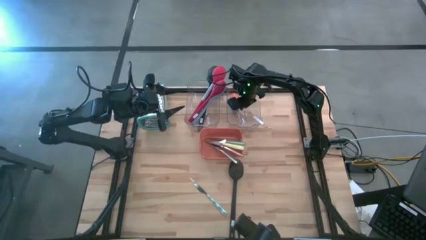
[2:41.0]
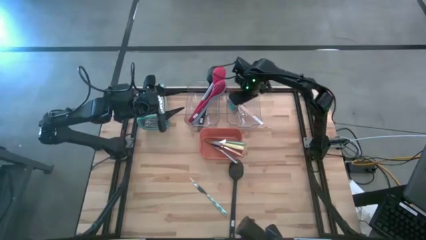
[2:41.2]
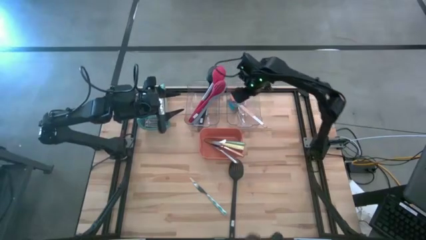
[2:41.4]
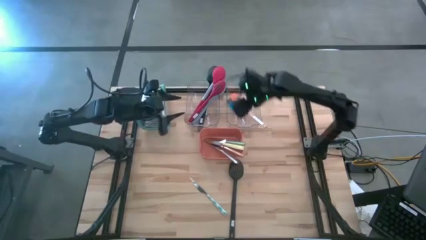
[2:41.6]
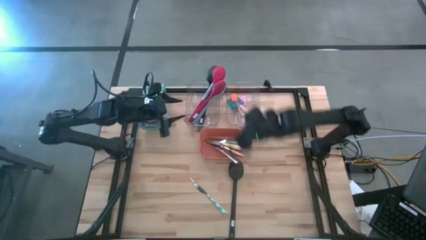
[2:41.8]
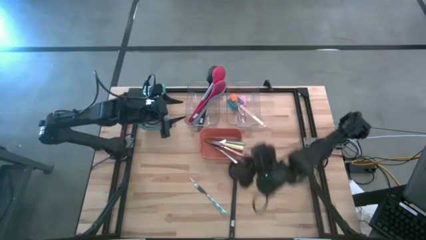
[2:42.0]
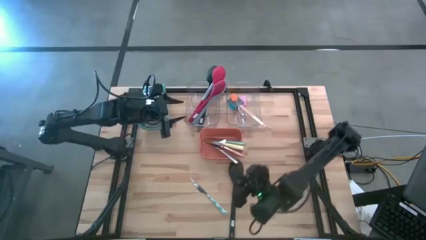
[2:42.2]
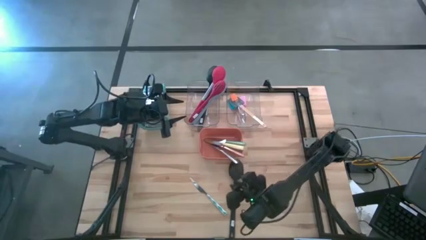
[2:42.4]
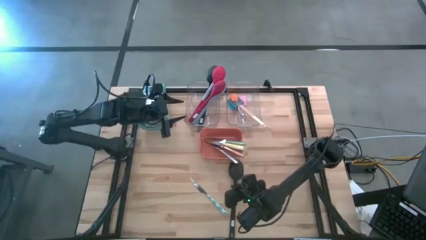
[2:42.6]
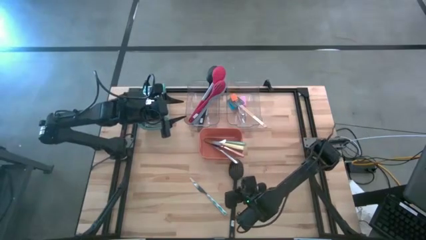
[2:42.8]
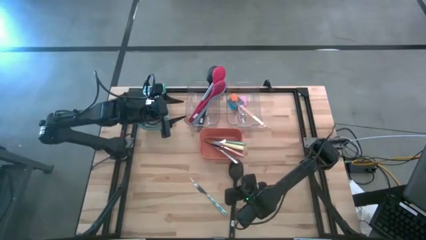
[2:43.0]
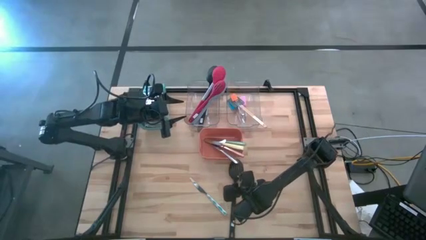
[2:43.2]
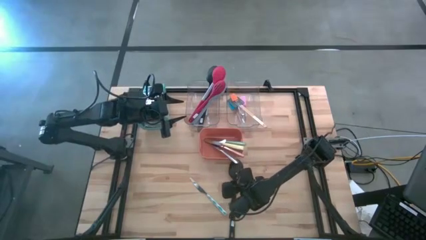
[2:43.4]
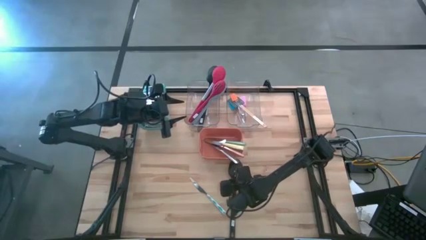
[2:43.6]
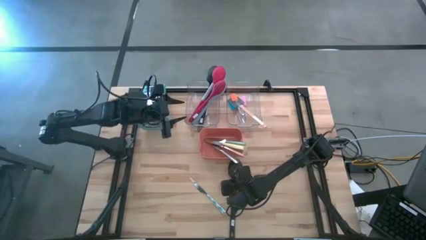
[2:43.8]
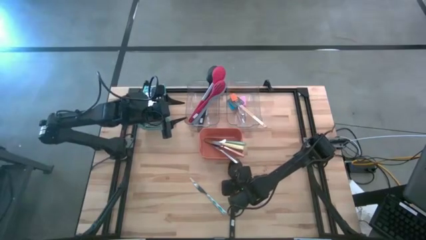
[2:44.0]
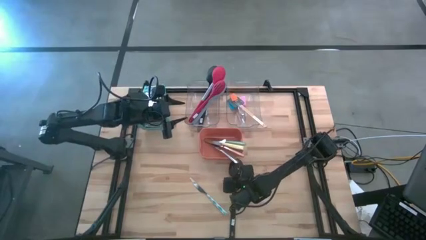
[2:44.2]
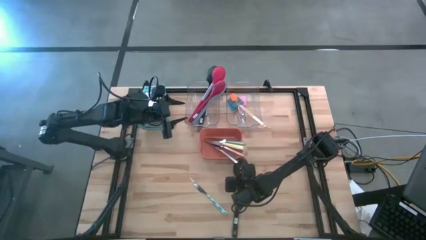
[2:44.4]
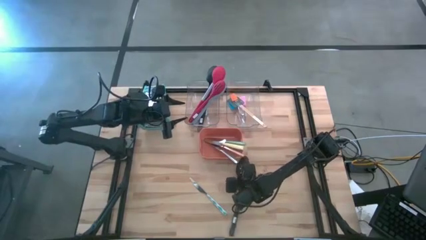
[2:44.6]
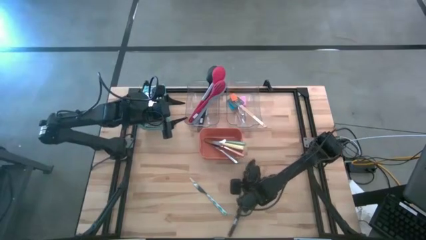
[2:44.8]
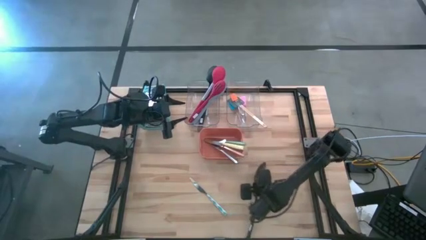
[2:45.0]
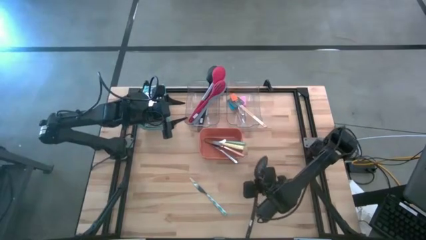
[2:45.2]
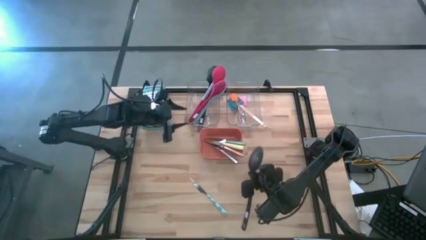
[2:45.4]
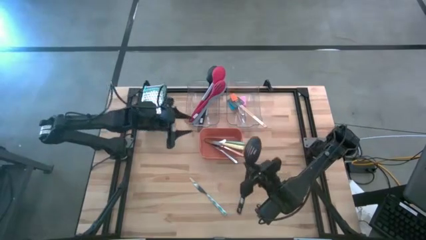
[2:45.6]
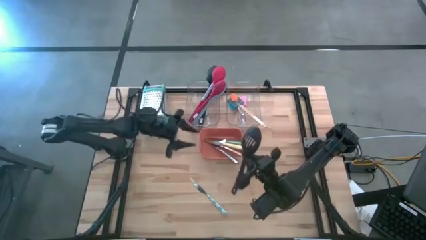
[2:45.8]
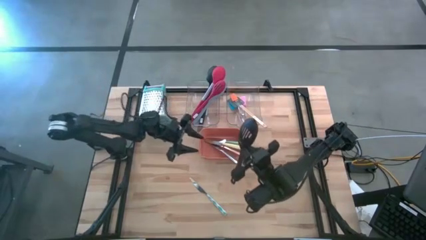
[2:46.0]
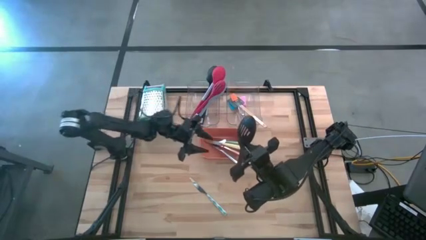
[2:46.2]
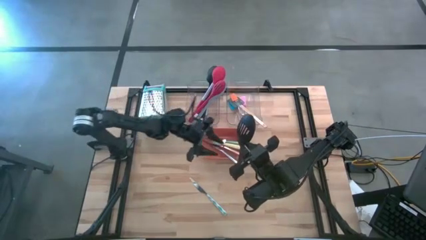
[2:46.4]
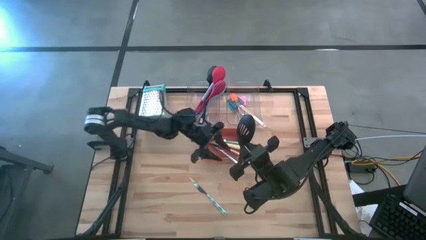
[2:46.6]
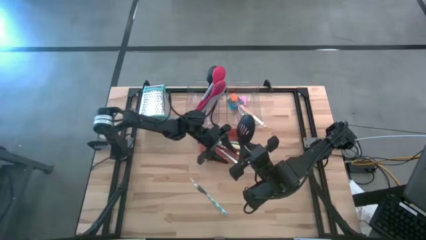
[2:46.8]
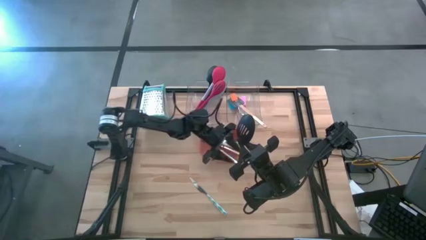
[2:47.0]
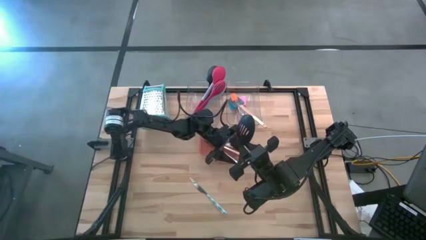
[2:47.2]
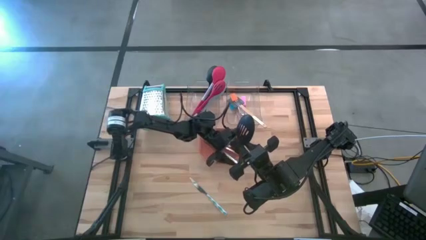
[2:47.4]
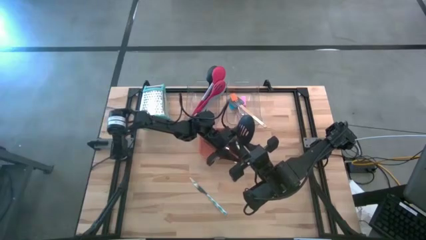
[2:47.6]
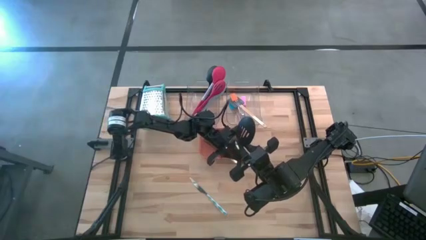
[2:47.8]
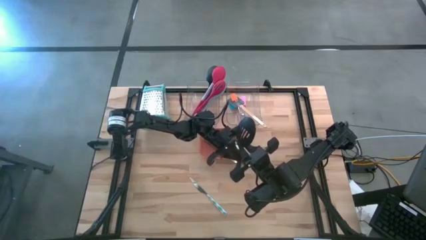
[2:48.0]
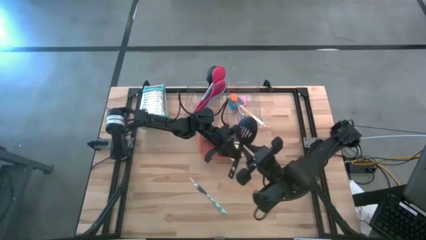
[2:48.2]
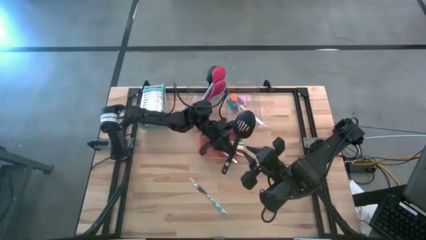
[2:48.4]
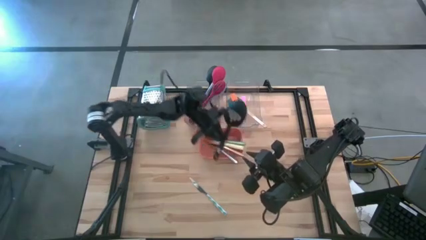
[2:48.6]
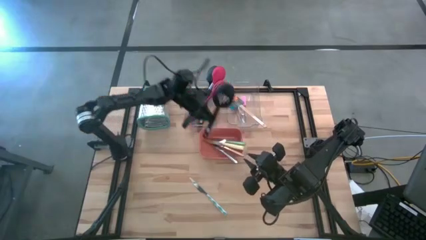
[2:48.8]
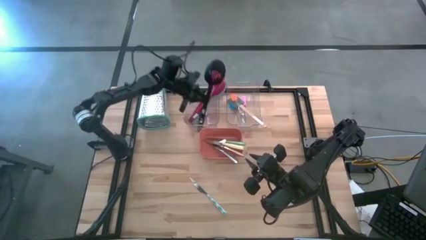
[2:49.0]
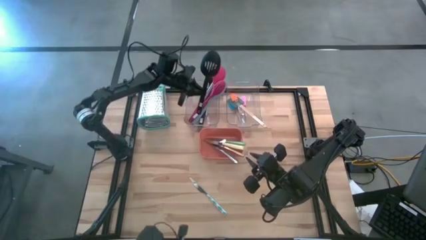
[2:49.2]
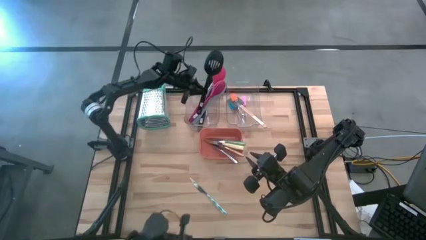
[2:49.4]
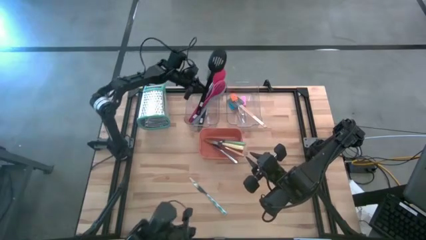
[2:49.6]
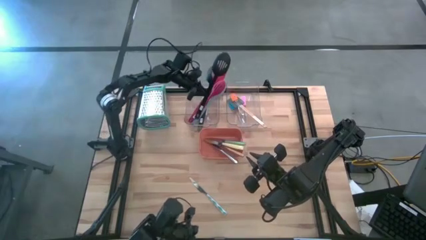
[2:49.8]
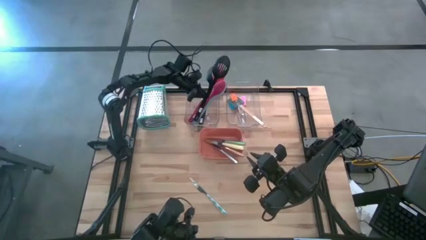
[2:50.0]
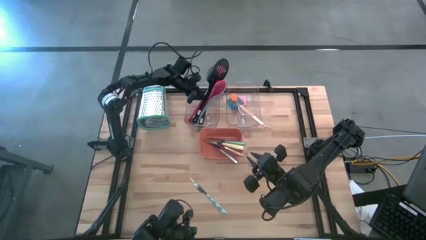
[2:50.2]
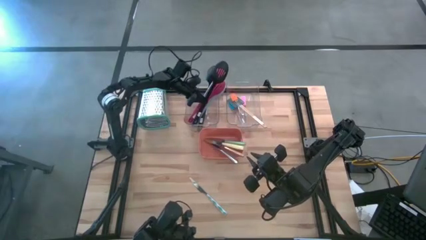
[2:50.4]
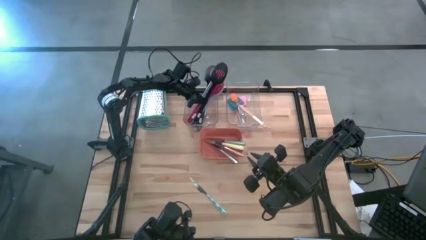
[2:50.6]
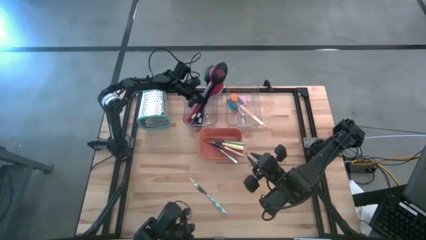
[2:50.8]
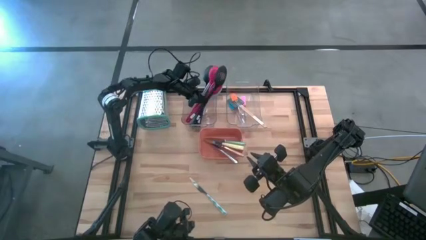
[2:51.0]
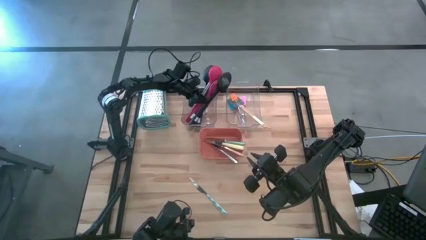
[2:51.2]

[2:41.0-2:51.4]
Task: Pick & Place Kitchen Items
Put the black serving spoon into the left transparent bin

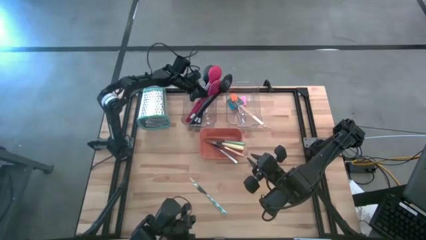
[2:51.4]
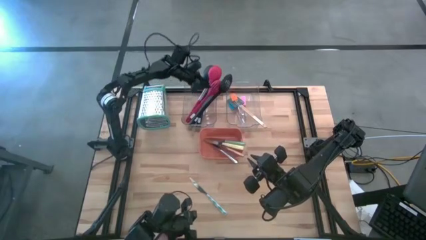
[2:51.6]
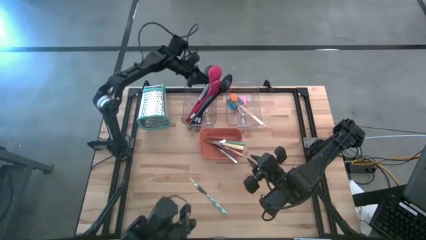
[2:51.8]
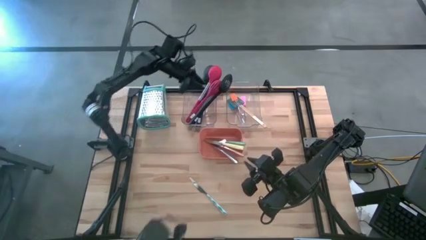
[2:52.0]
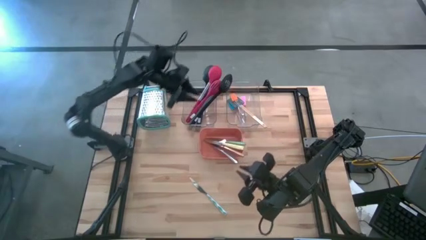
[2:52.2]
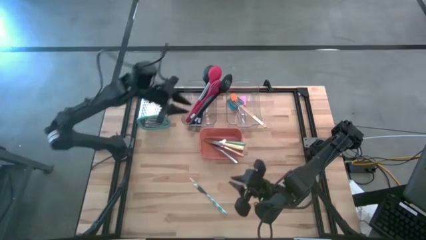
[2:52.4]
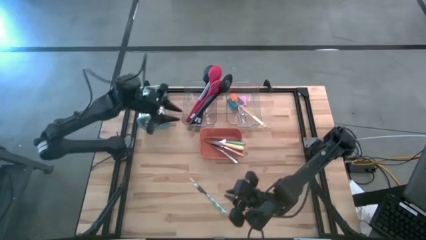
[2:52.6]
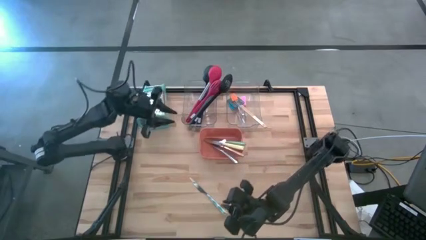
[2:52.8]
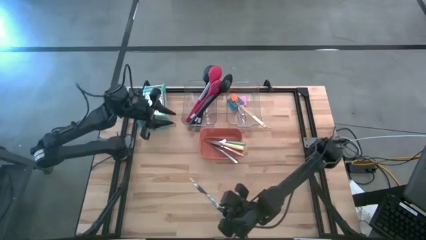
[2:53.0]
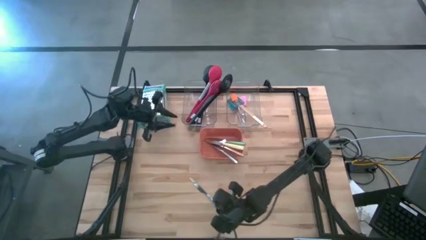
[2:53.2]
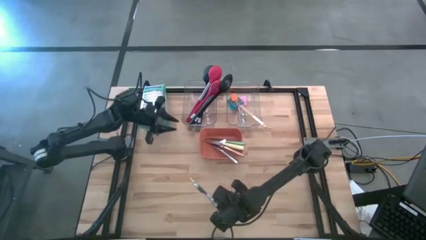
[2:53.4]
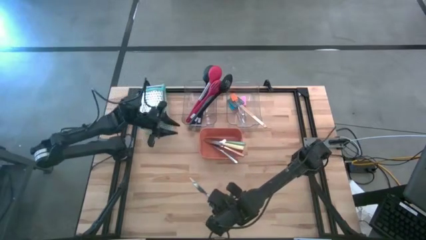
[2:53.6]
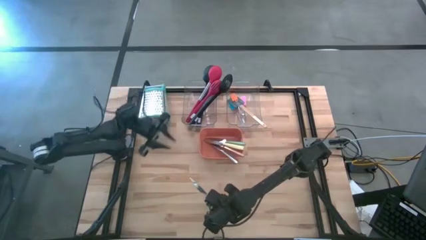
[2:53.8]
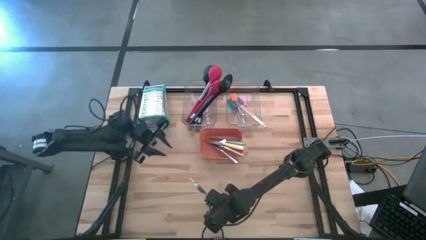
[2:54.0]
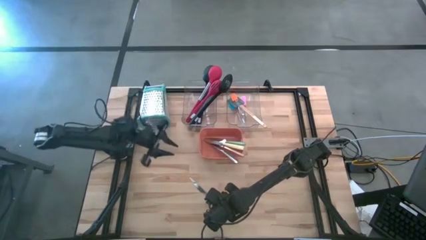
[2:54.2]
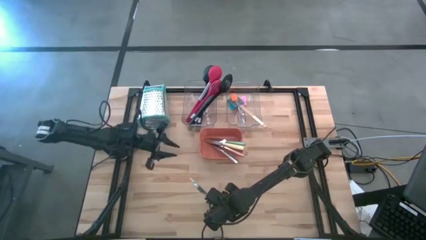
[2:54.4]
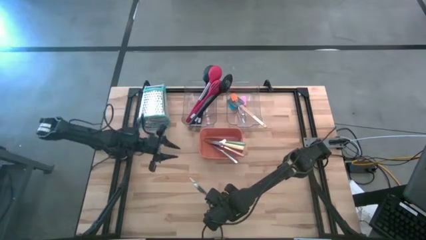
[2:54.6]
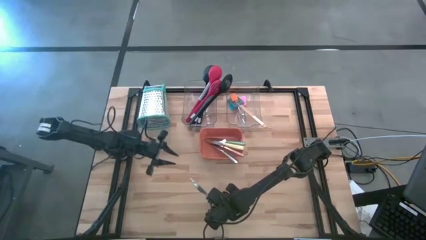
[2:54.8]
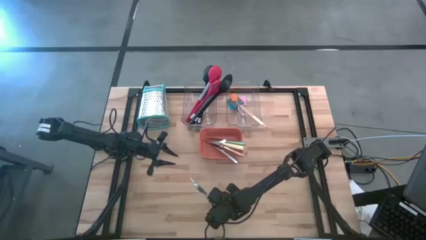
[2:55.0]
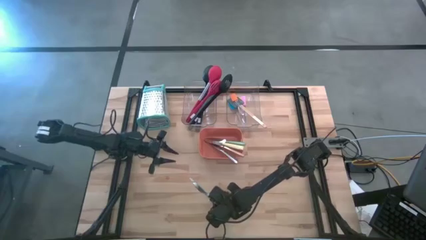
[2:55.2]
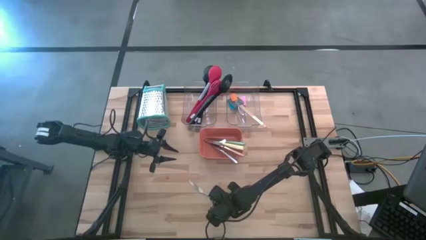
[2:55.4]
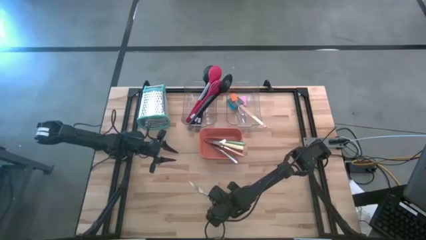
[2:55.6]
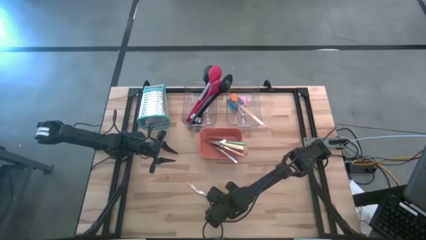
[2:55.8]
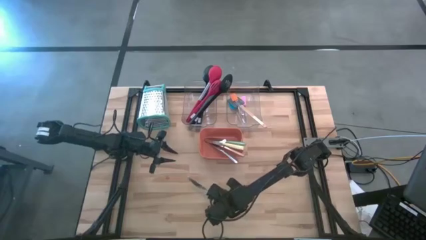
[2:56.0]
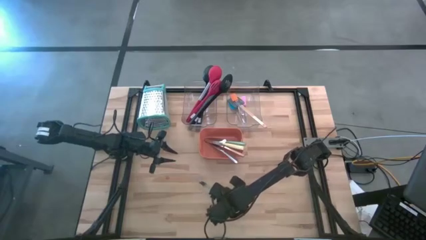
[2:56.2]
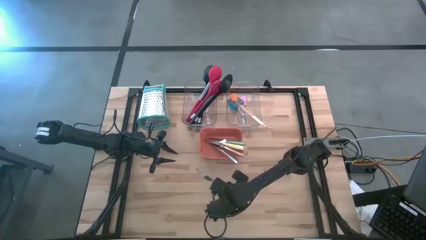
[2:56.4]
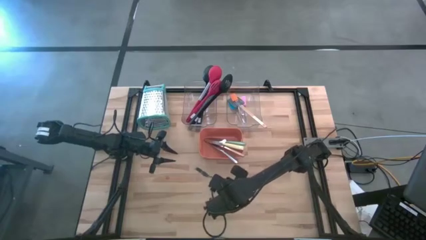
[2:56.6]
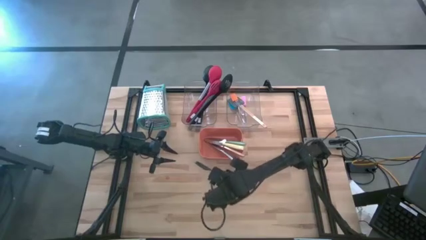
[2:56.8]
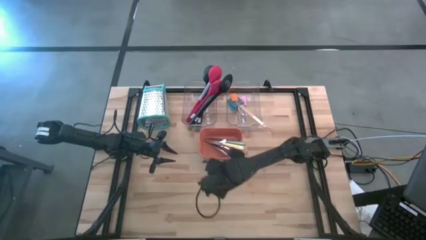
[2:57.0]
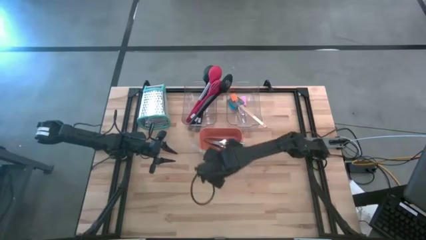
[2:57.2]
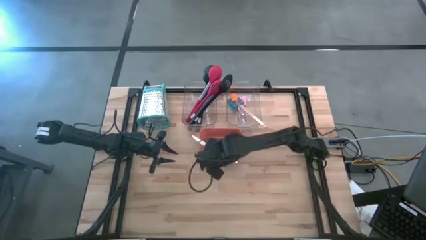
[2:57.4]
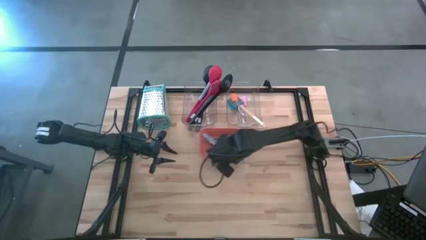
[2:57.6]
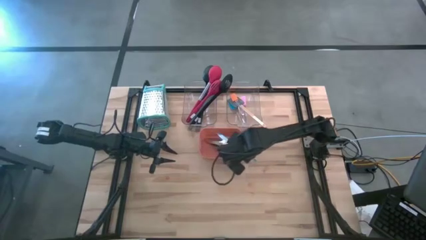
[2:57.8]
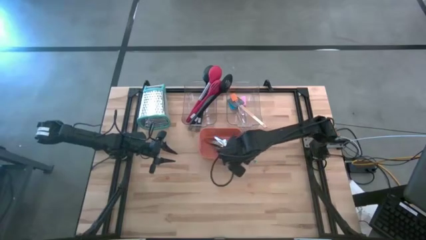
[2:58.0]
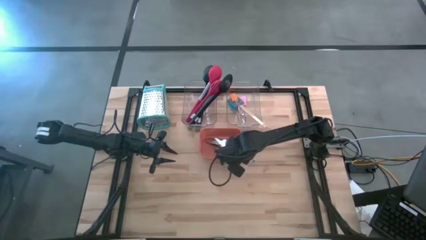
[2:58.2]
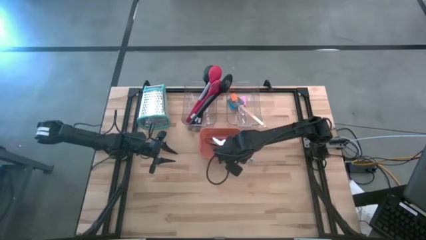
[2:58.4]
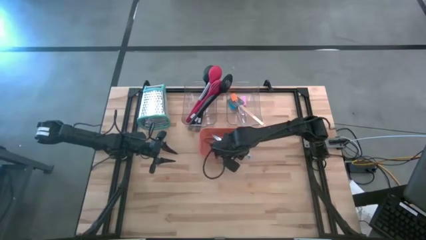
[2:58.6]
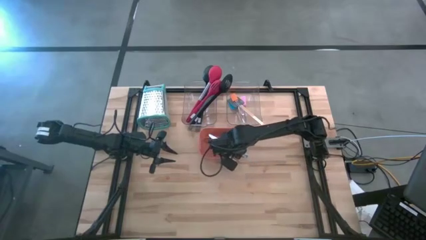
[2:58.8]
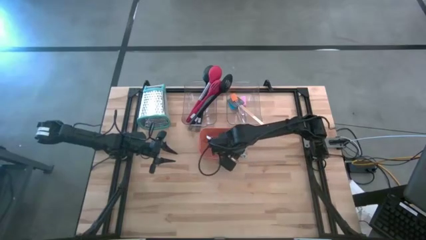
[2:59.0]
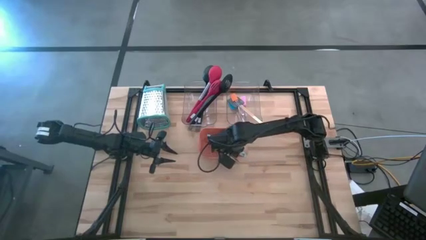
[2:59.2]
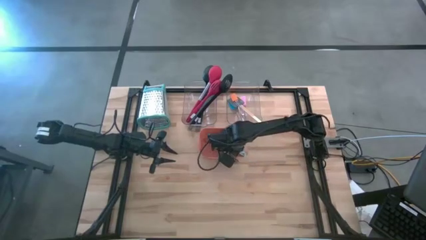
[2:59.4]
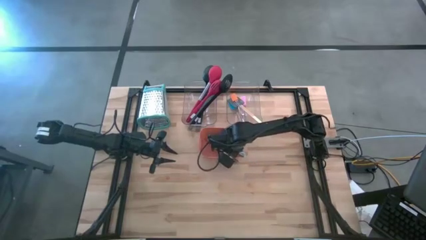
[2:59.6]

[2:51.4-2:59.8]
Put the blue knife into the orange bin
